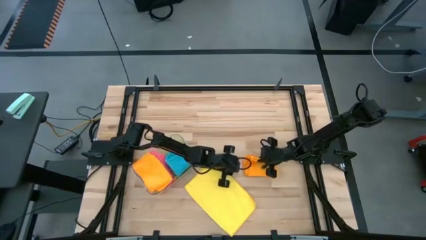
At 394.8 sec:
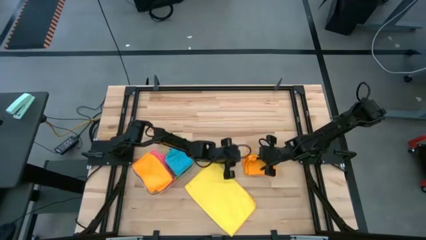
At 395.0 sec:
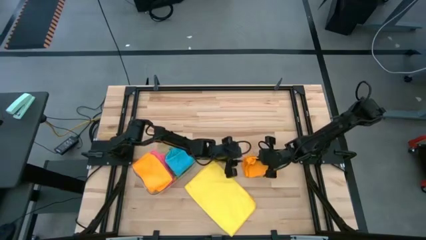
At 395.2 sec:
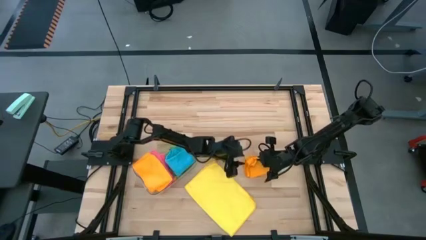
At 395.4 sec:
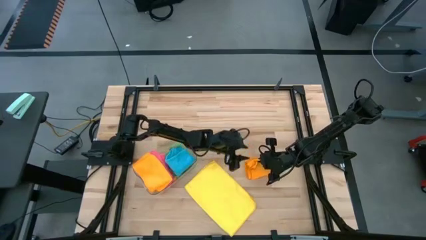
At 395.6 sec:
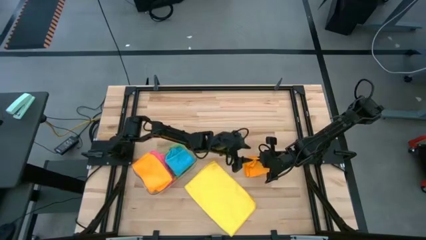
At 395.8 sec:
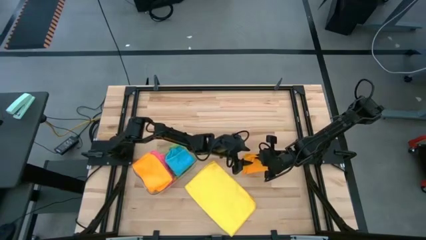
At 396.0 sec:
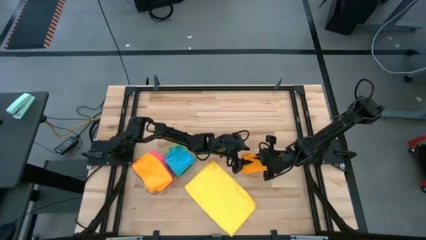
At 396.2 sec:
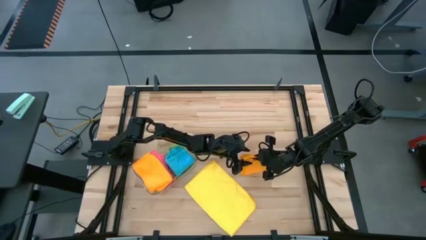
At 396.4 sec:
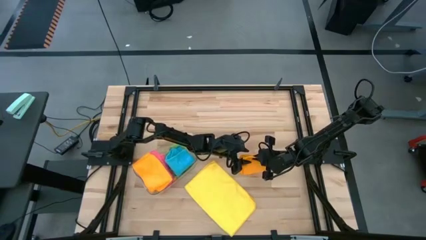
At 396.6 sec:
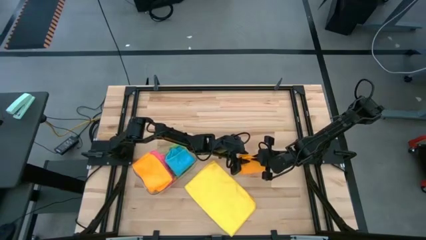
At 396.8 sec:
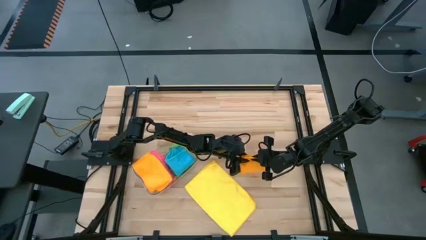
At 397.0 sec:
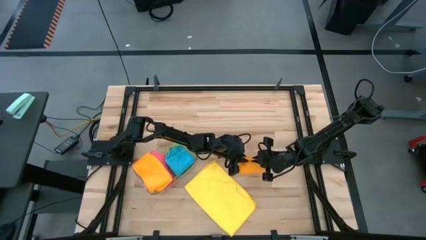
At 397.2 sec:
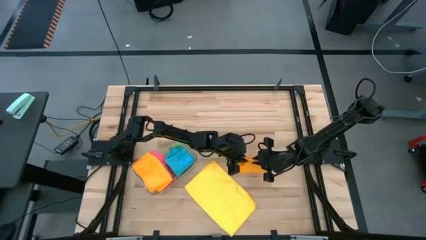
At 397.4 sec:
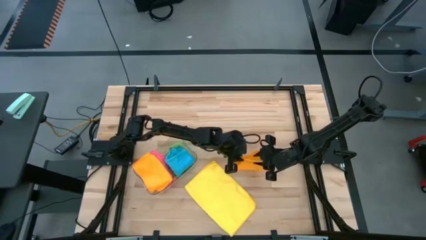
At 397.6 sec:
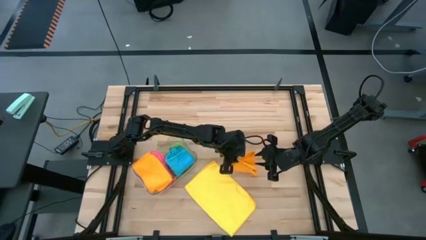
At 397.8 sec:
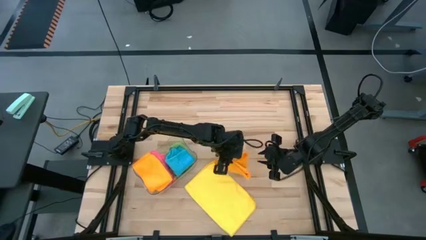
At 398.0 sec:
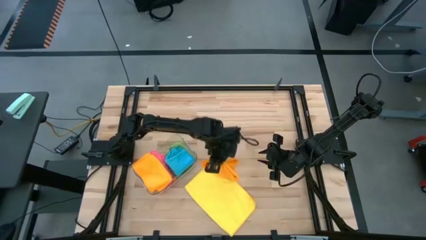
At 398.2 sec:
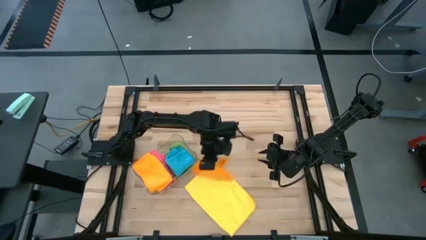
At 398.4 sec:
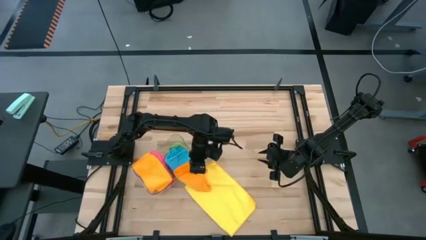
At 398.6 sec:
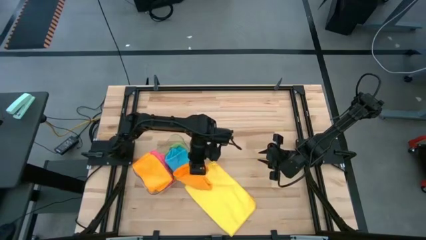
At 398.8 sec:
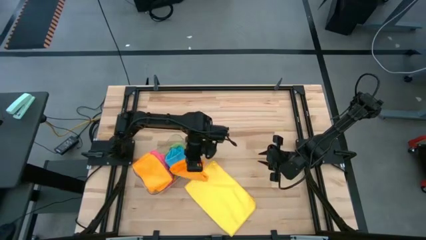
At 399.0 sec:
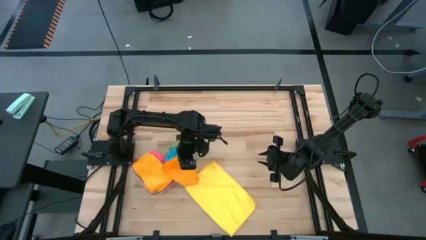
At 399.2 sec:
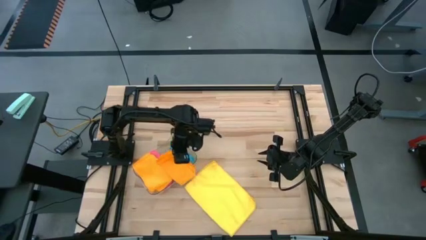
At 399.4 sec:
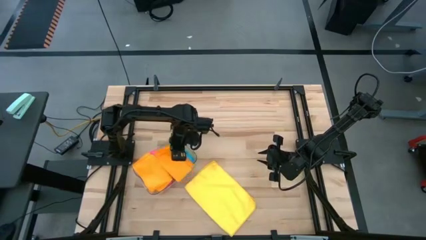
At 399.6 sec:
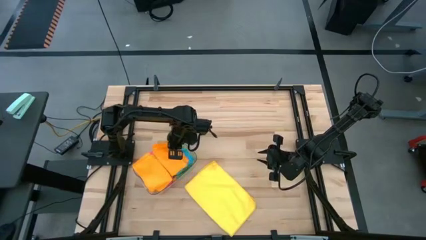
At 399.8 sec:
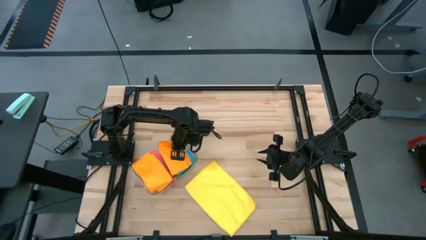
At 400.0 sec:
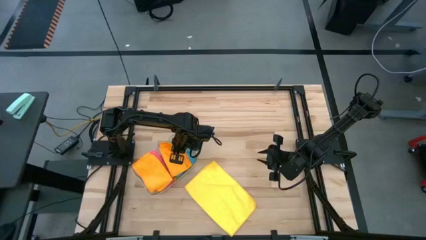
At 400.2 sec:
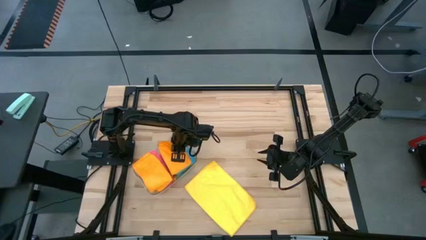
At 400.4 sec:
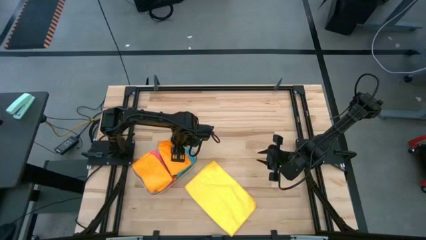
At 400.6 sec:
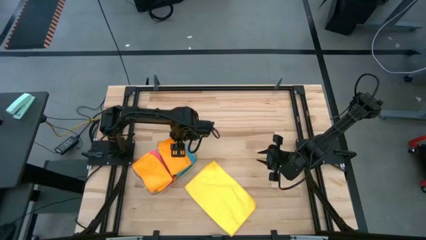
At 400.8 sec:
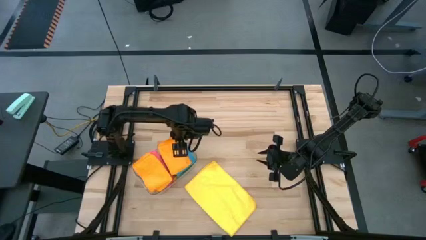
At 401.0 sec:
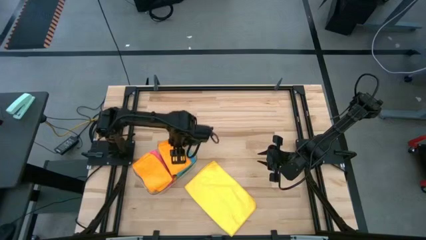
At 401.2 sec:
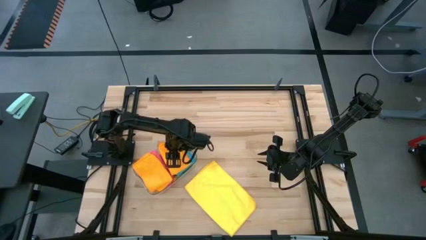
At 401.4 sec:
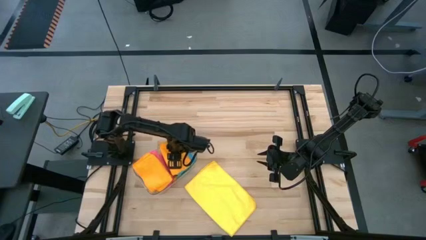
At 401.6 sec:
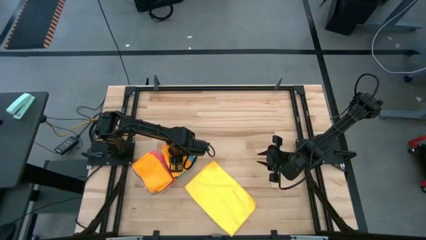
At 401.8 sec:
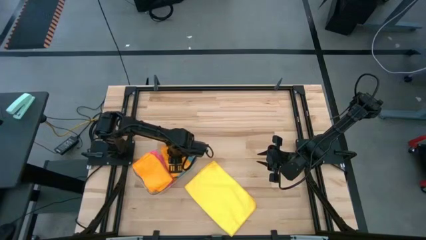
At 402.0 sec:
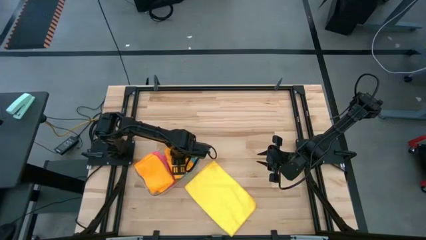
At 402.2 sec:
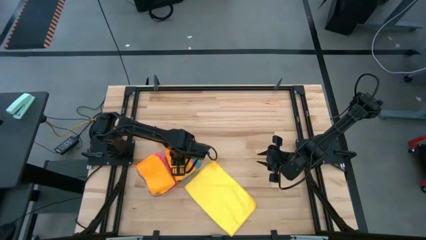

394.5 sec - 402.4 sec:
Task: Fold microfiber towels
Put the folded orange microfiber cloth into the transparent bin

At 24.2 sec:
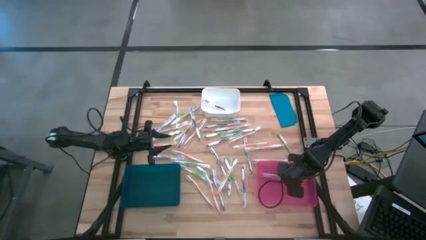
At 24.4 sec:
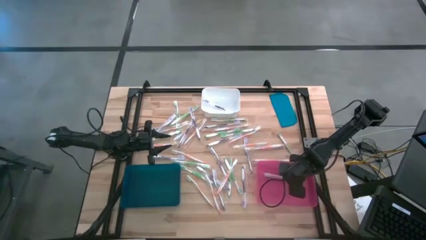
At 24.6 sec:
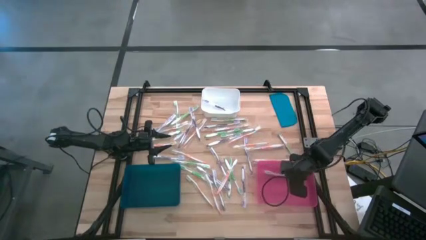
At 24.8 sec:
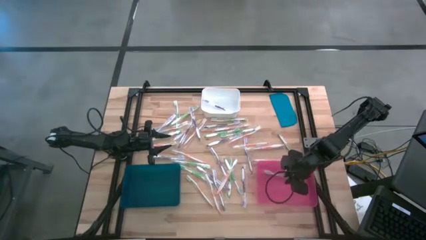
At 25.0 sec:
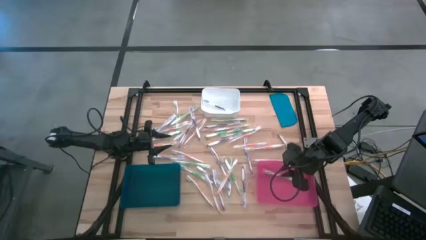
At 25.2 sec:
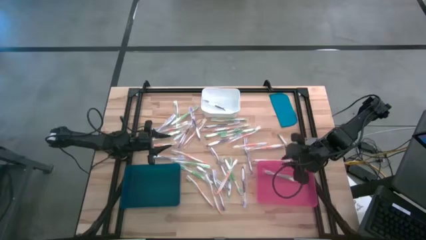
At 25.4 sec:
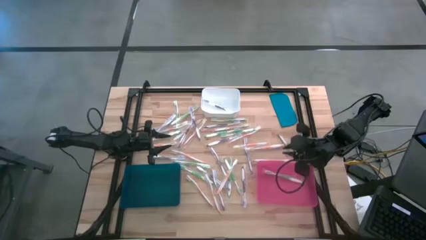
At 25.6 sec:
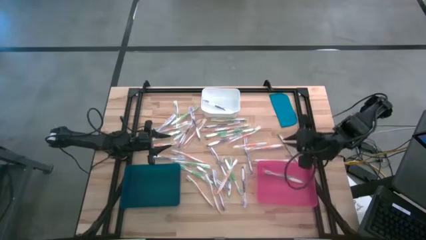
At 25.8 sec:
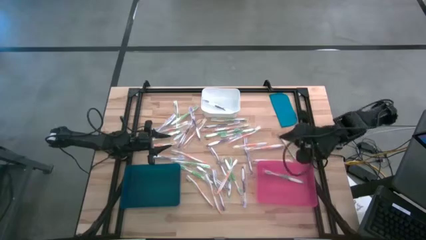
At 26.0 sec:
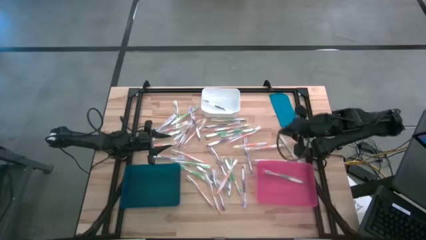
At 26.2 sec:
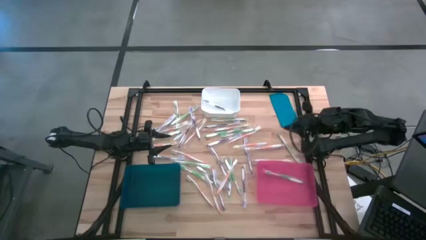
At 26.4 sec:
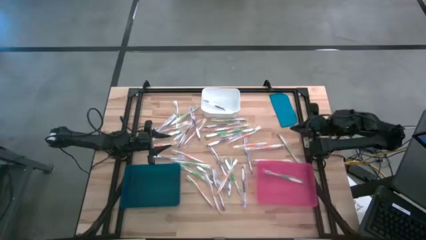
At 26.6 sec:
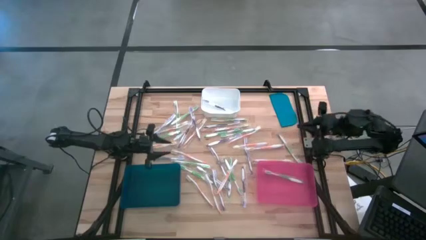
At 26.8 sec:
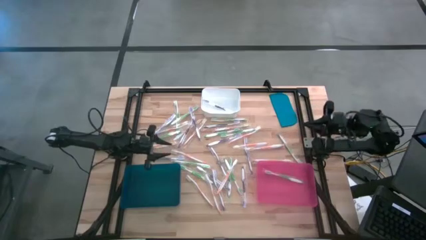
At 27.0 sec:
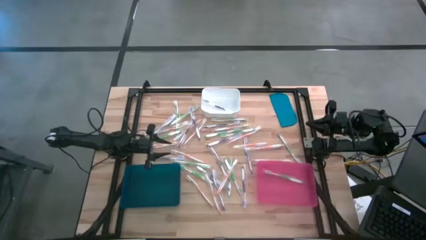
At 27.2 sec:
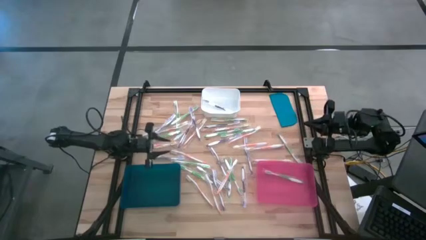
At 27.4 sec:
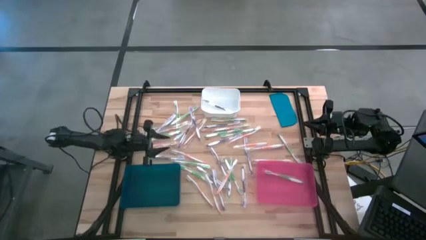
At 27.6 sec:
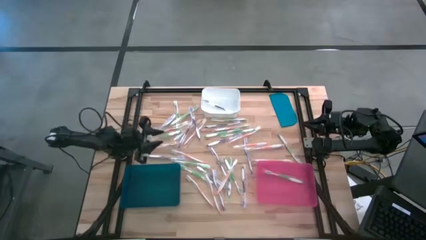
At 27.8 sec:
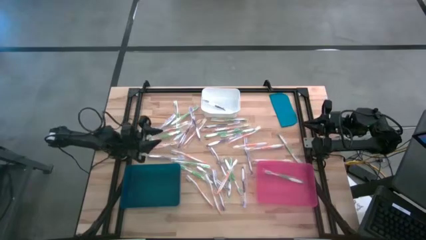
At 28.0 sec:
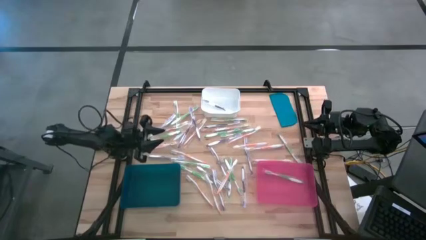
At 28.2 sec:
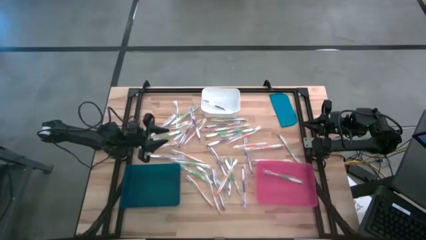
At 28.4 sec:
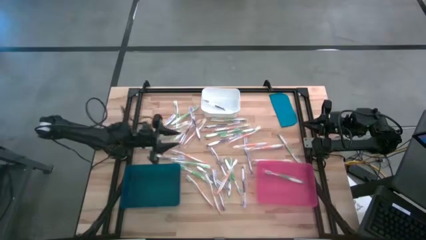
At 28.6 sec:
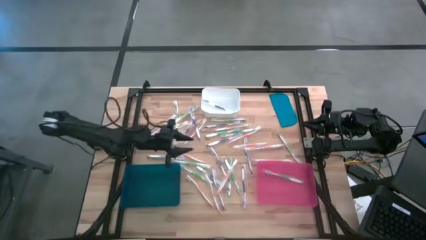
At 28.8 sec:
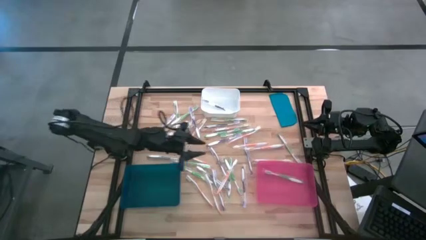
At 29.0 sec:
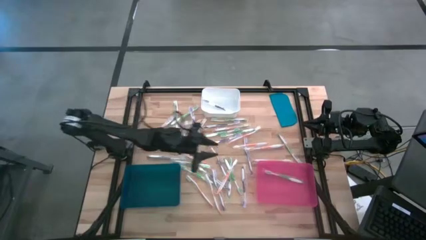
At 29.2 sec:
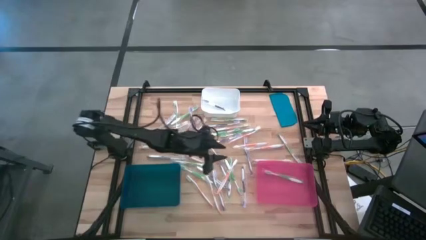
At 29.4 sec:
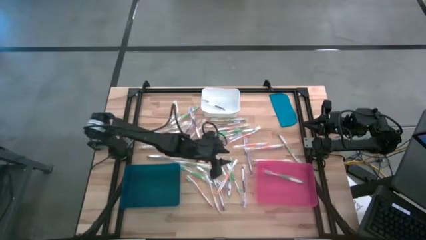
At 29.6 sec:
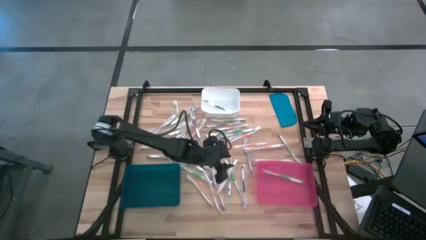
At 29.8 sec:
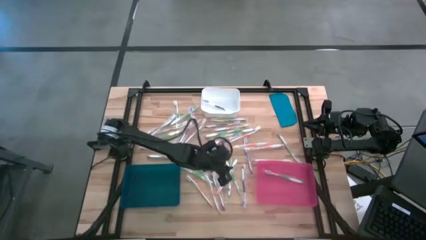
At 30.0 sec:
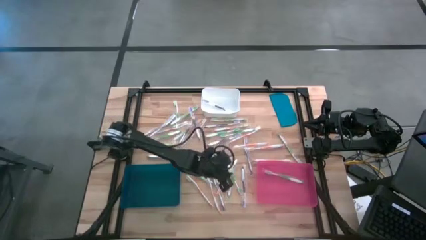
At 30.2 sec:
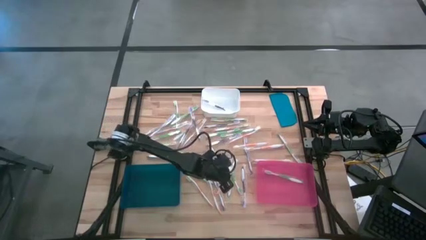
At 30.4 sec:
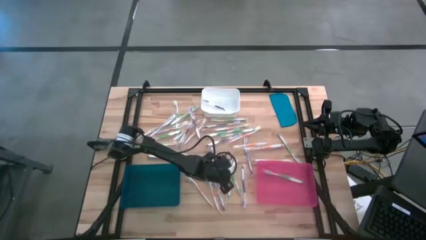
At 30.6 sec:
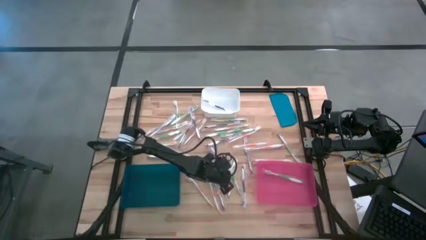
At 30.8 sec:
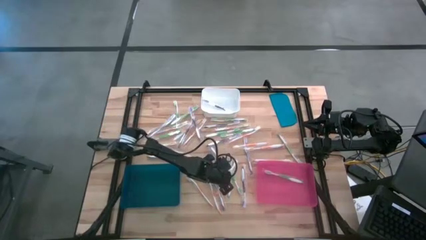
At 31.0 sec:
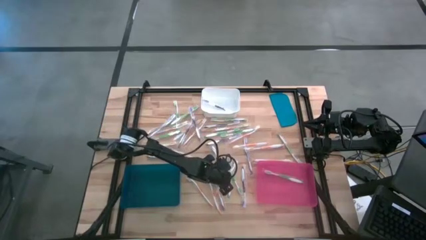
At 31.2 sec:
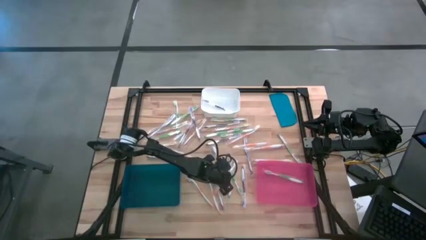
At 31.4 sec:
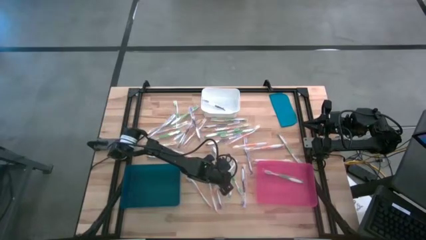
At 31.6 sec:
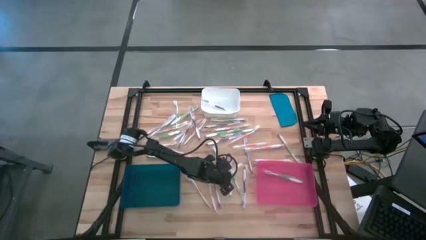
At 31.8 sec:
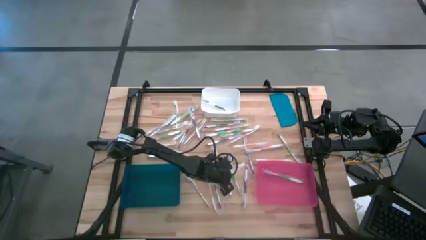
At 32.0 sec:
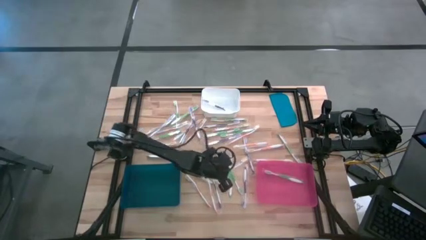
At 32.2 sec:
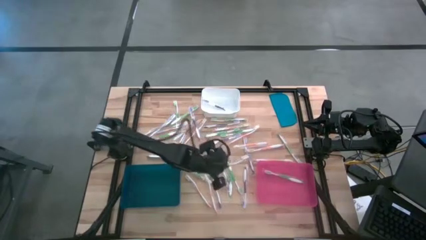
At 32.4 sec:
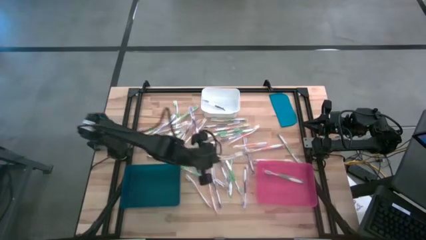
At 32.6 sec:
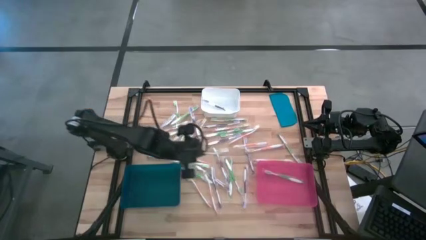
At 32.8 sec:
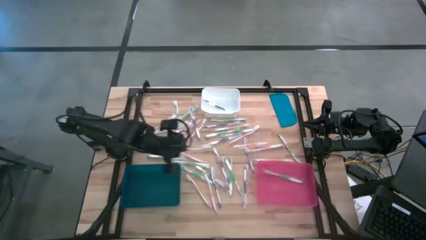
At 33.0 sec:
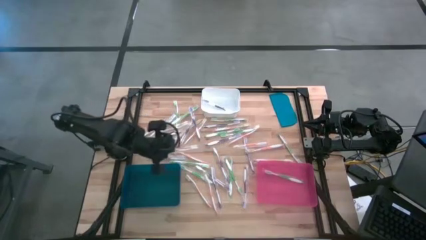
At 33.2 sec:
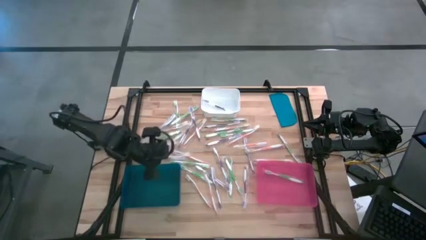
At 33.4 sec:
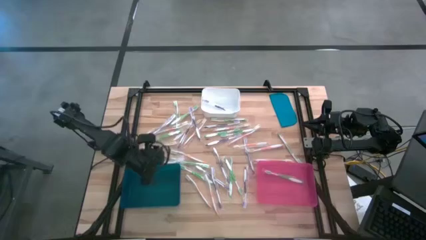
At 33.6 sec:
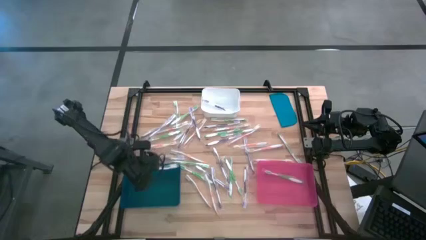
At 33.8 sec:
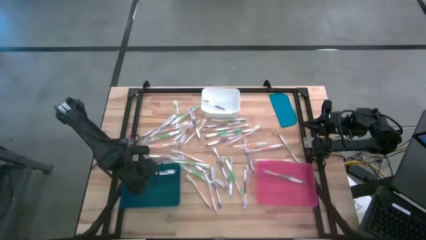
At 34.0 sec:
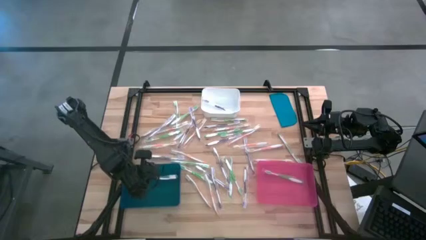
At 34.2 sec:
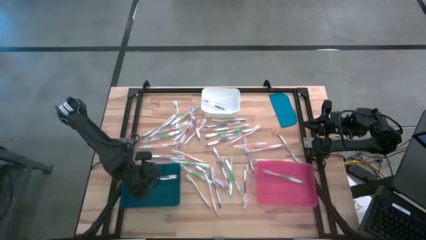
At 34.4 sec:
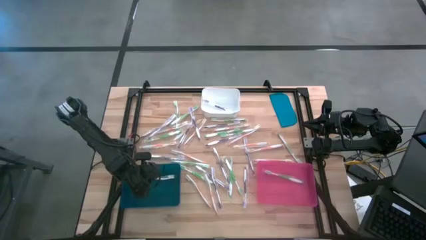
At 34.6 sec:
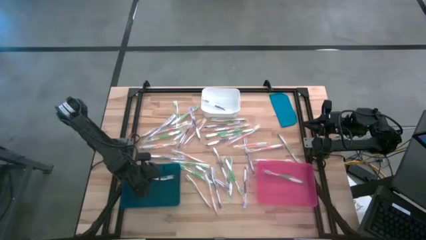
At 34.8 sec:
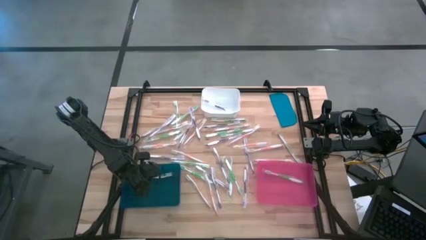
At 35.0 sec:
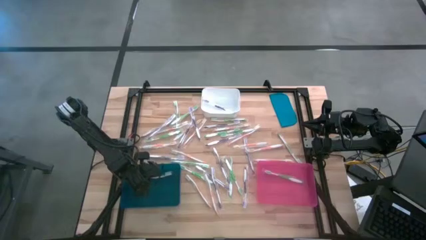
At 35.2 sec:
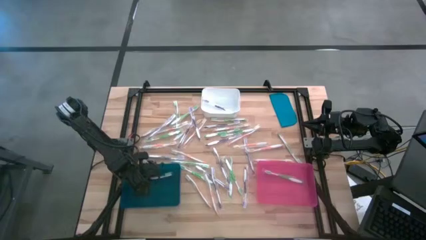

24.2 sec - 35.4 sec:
Task: Pick & Place Toothbrushes
Put the orange toothbrush into the blue bin
